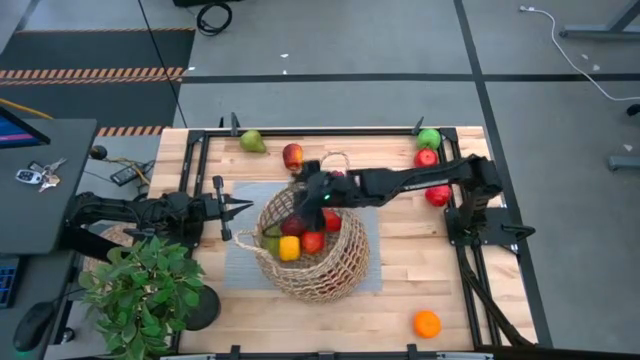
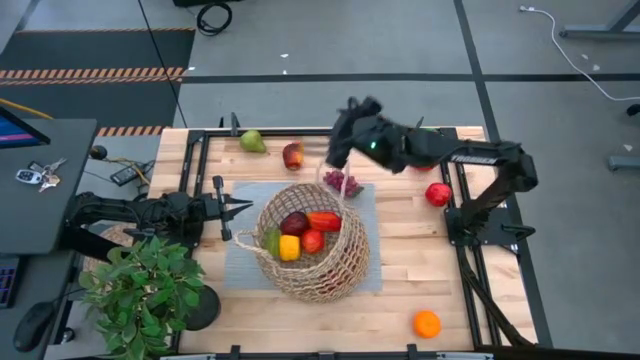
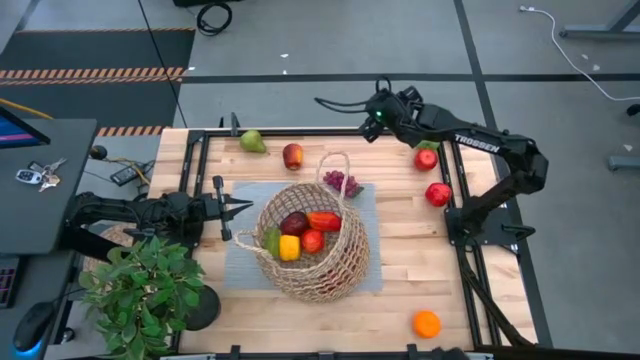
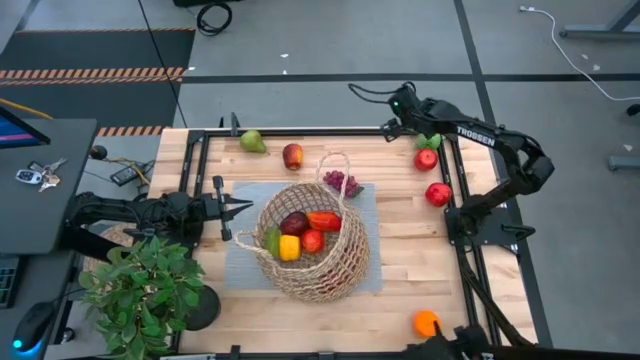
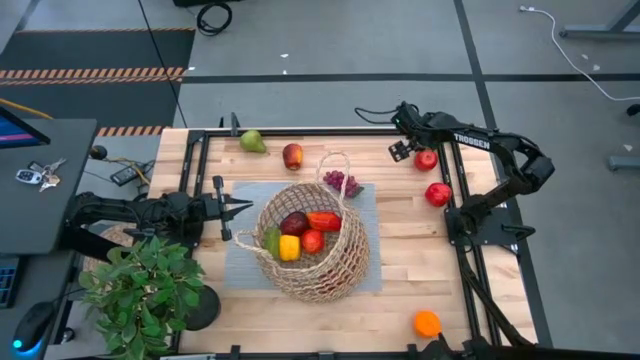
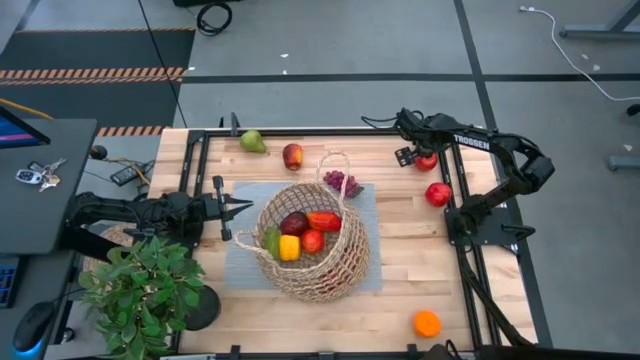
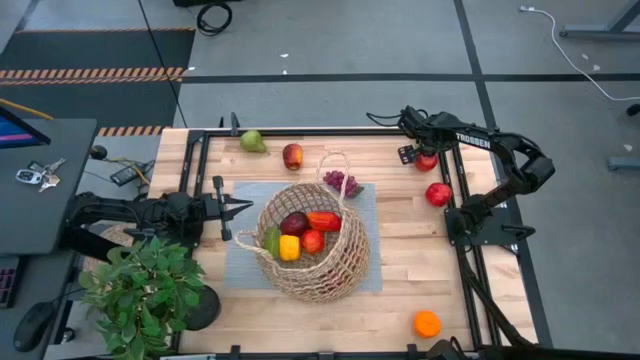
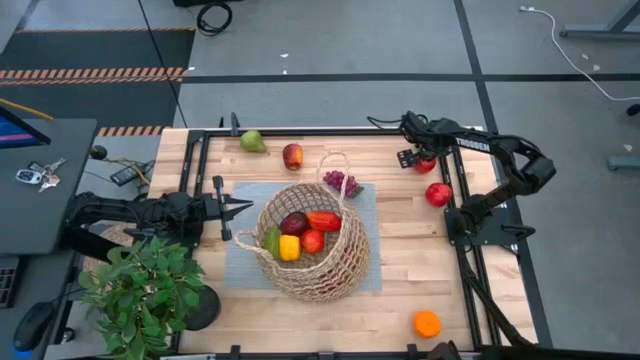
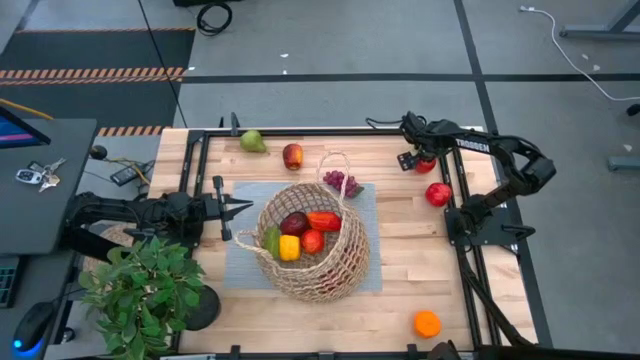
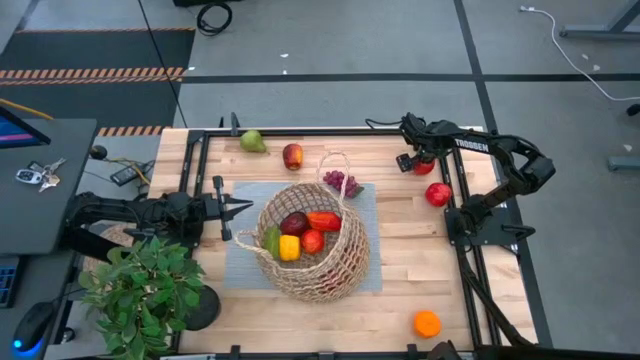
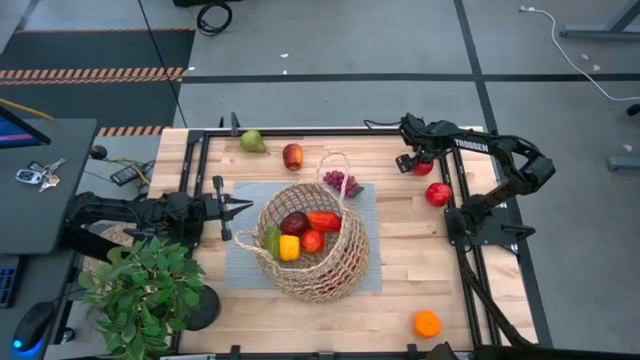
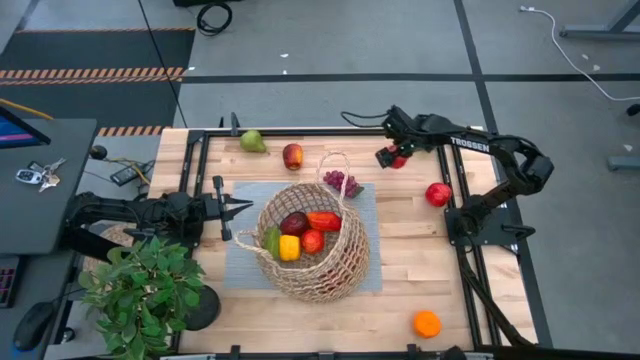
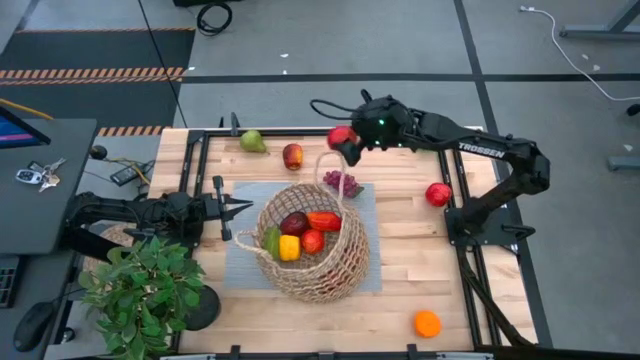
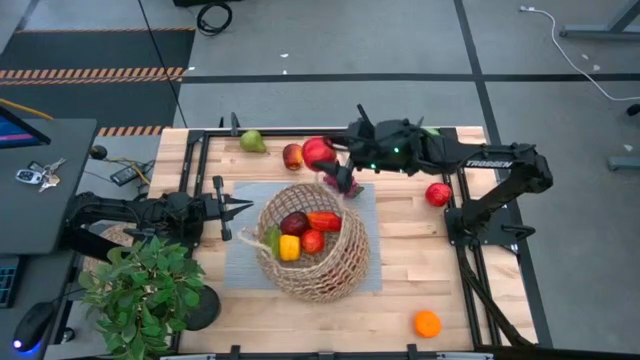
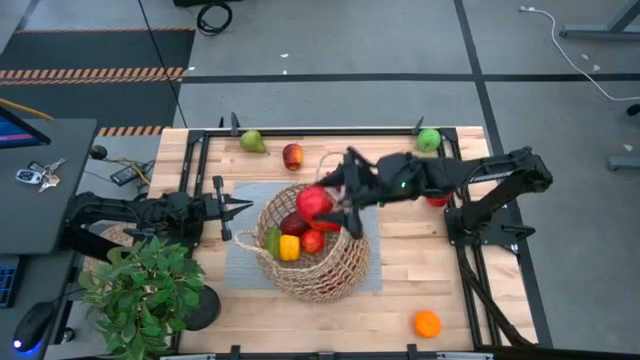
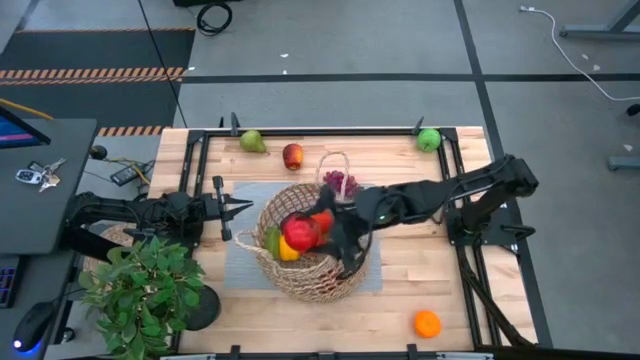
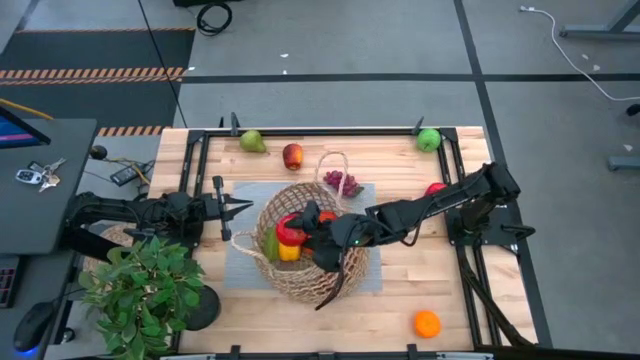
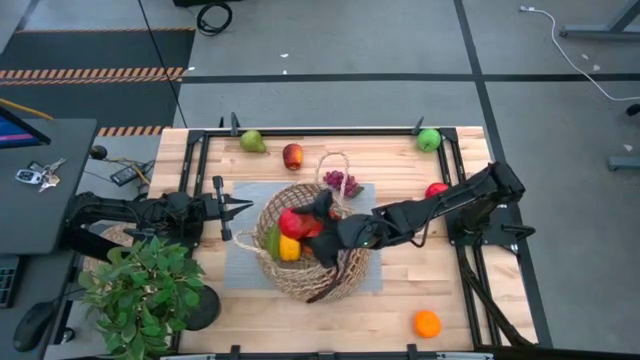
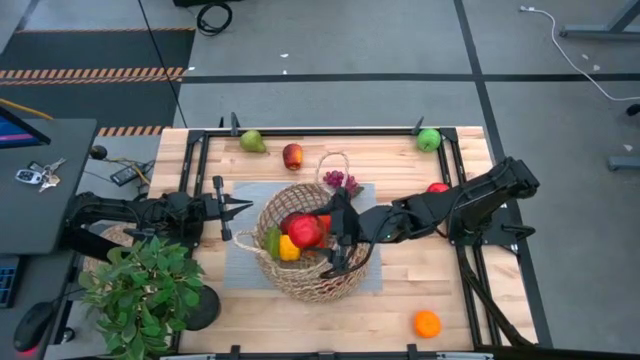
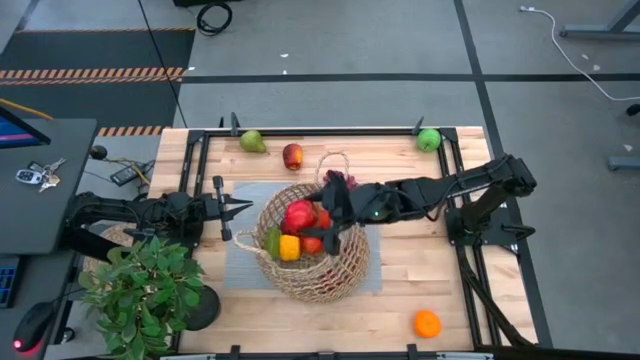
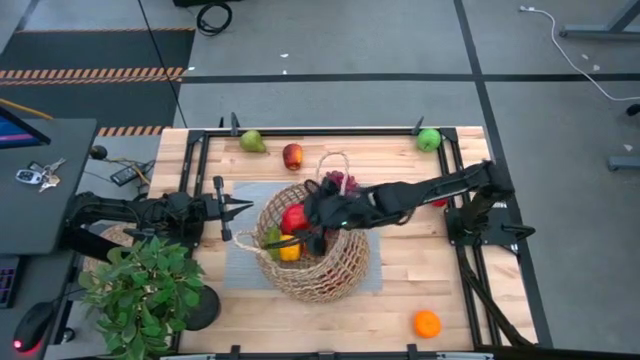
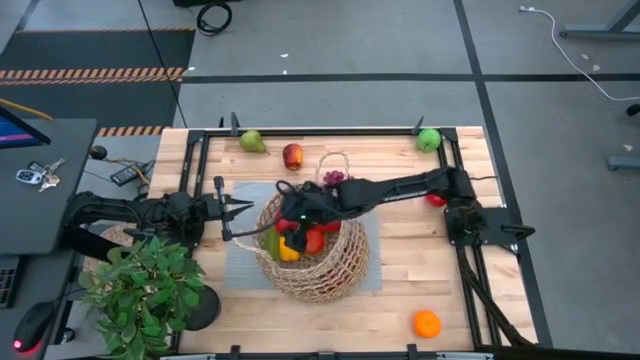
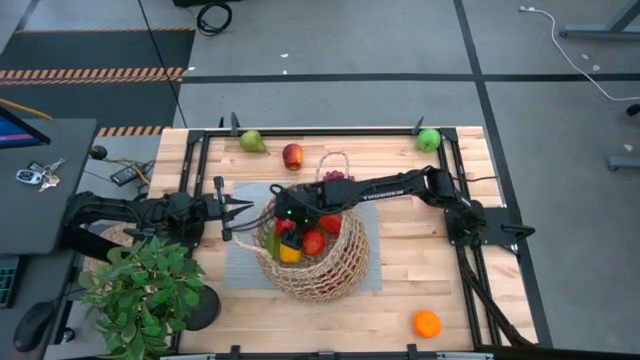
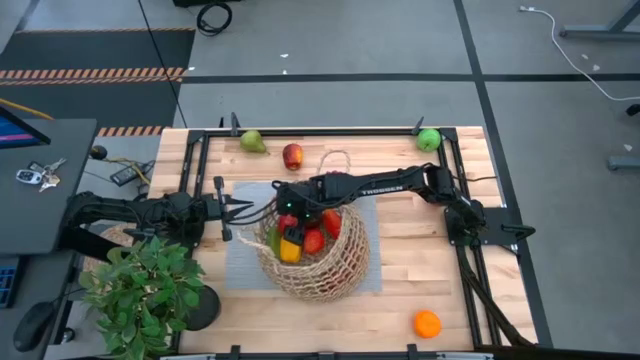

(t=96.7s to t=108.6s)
Task: Build produce basket
Put the red apple into the brown basket

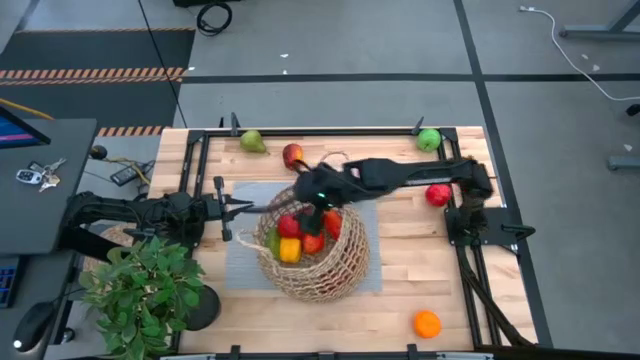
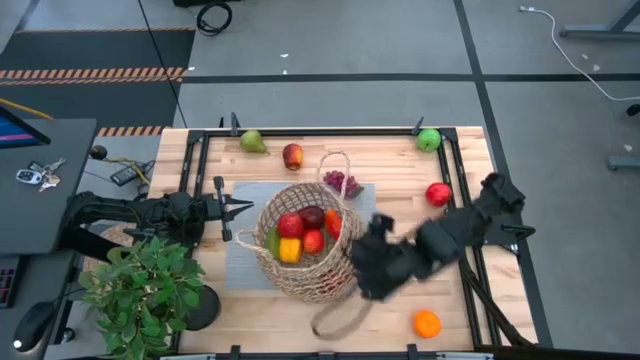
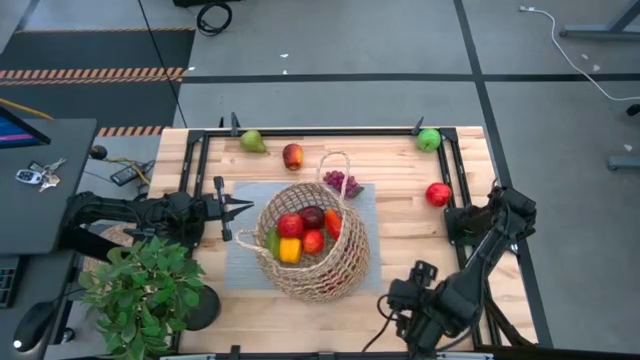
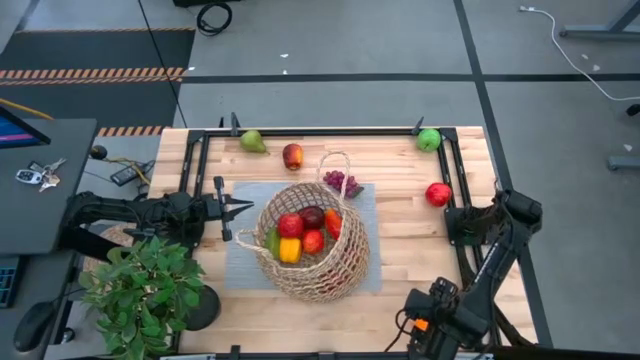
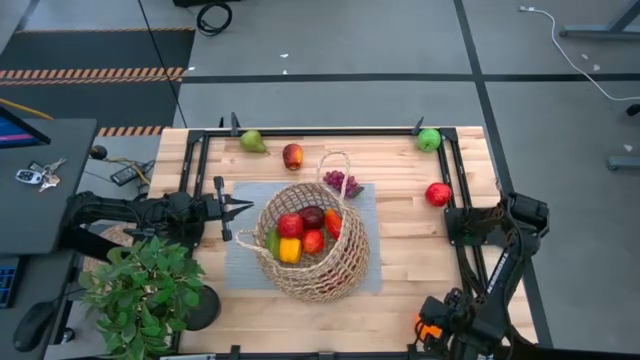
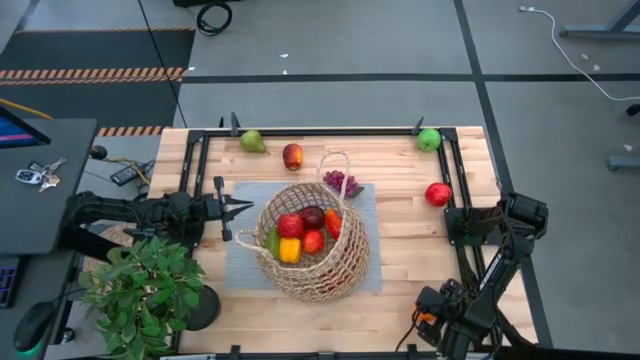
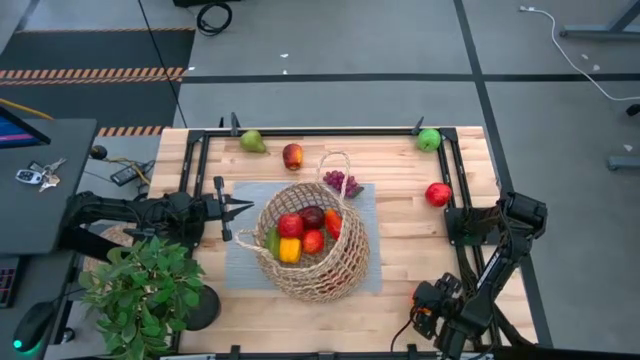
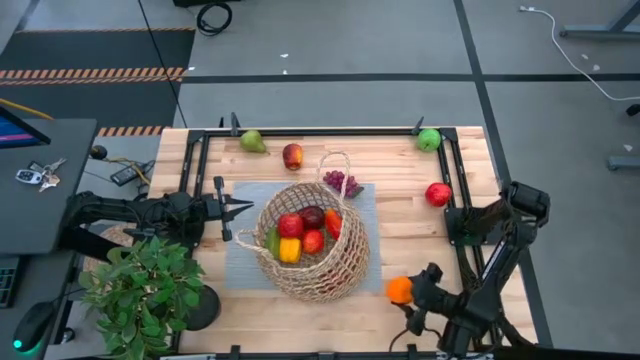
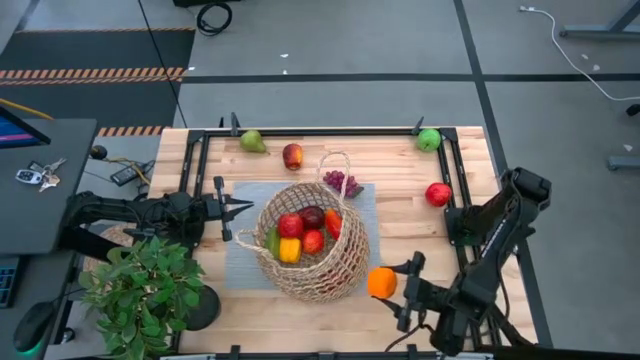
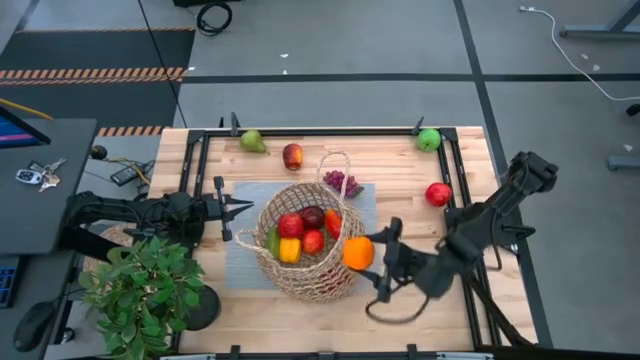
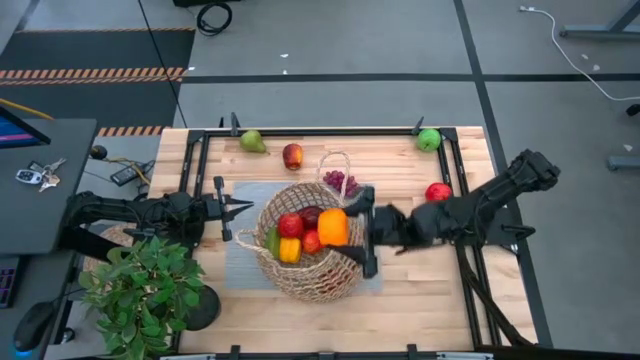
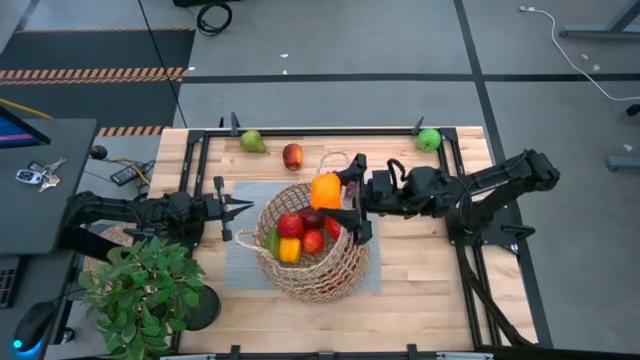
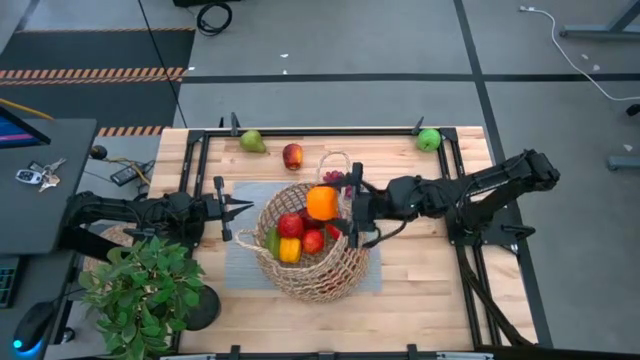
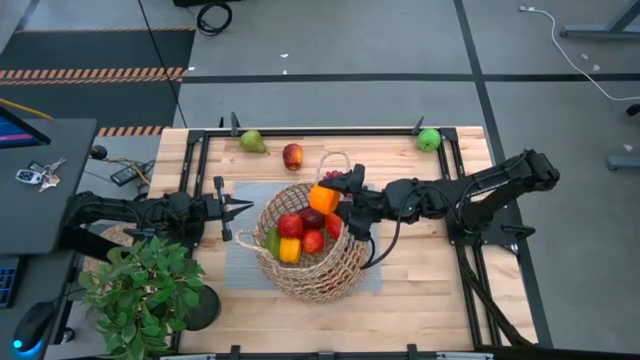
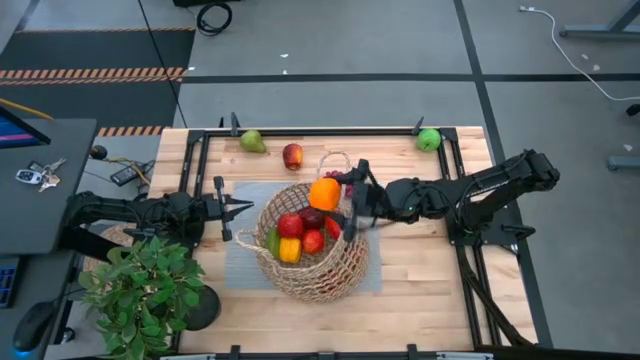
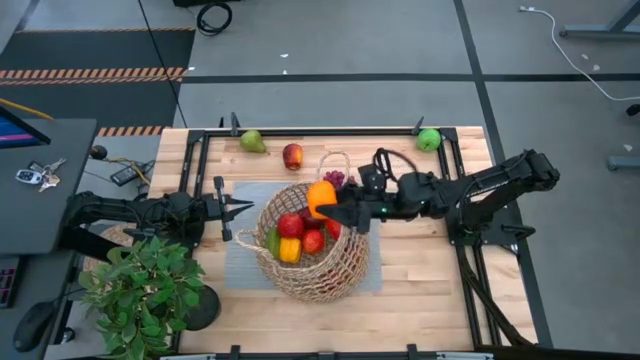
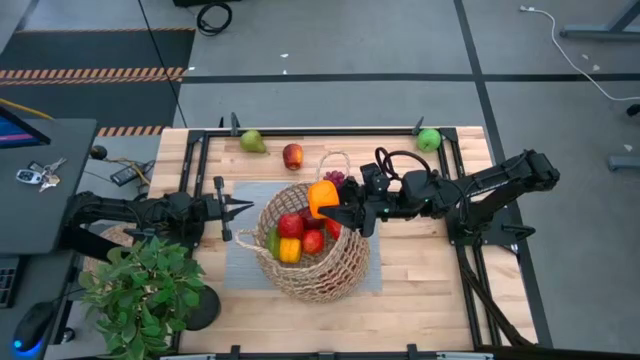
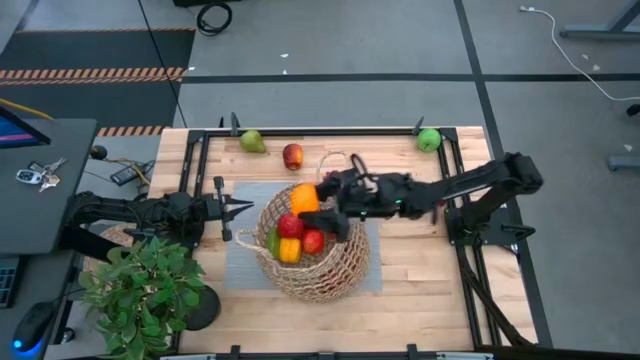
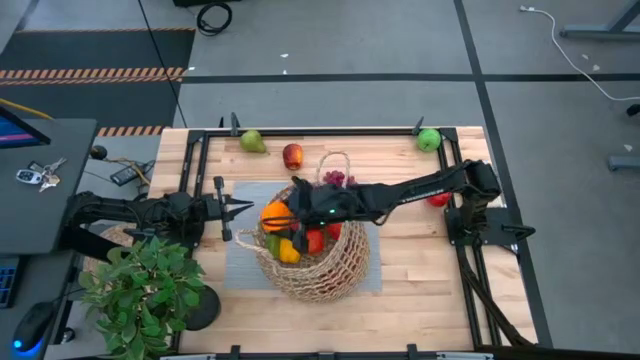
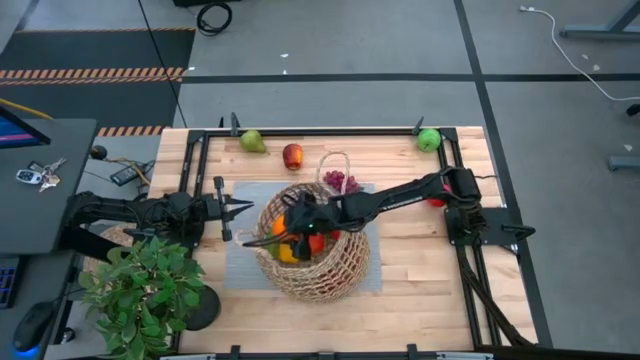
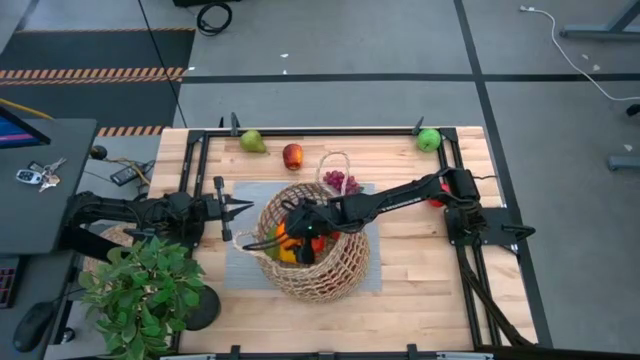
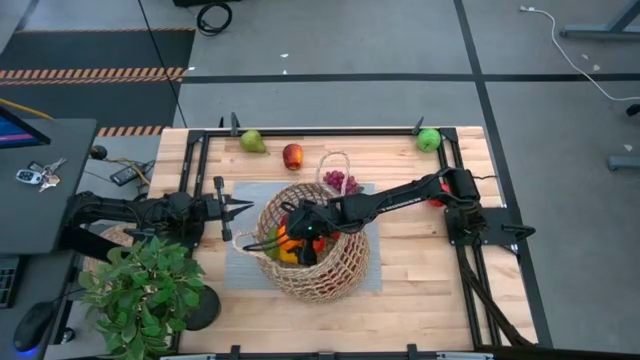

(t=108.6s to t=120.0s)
Put the orange into the brown basket

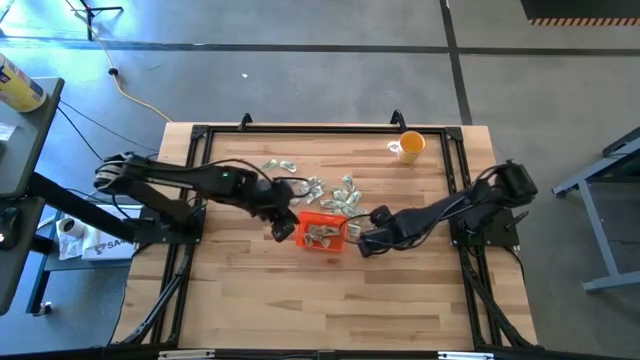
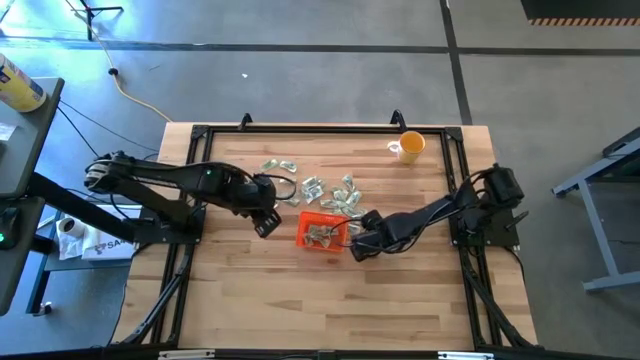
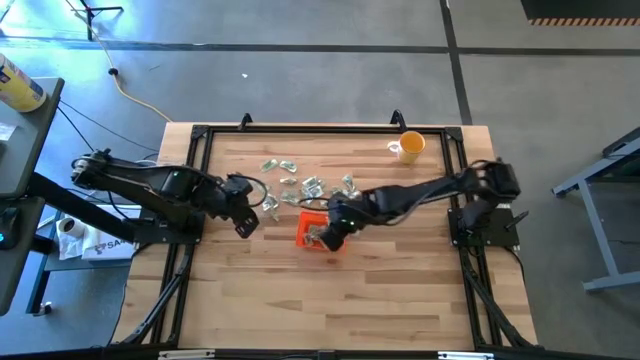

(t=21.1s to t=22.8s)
Task: Pick and place Stevia / Truvia into bins
Put the stevia packet into the orange bin
